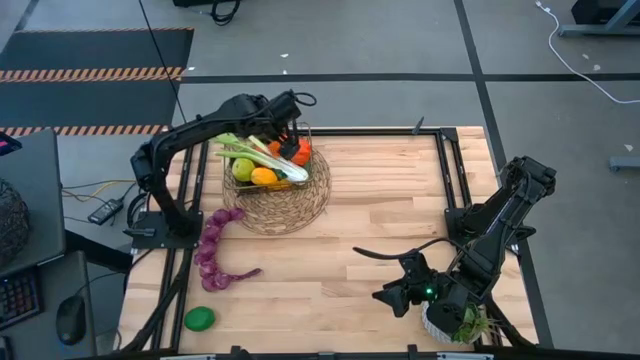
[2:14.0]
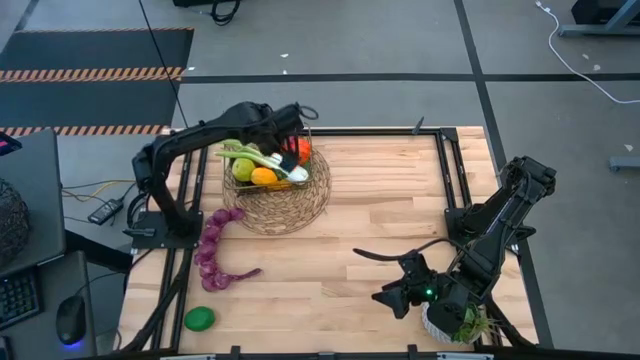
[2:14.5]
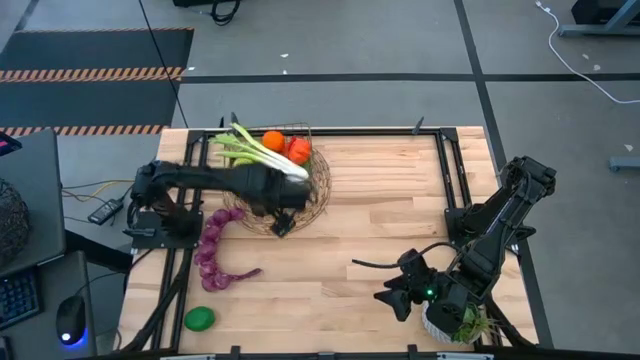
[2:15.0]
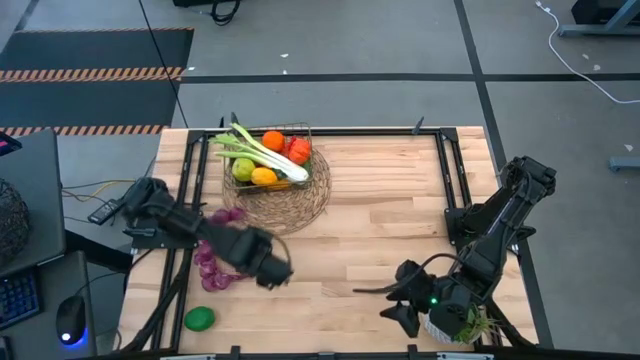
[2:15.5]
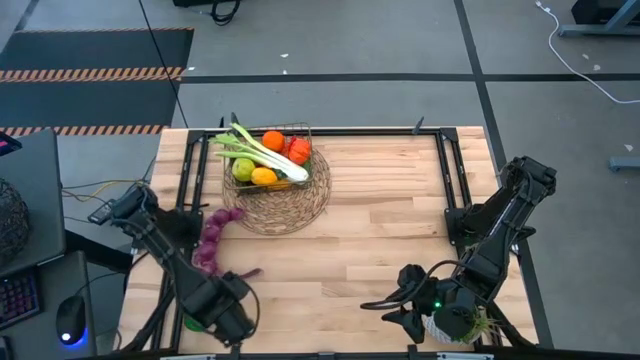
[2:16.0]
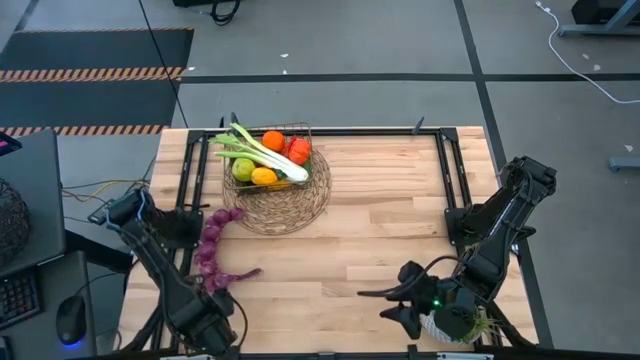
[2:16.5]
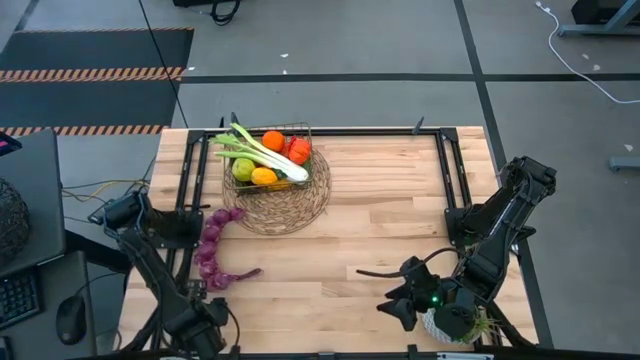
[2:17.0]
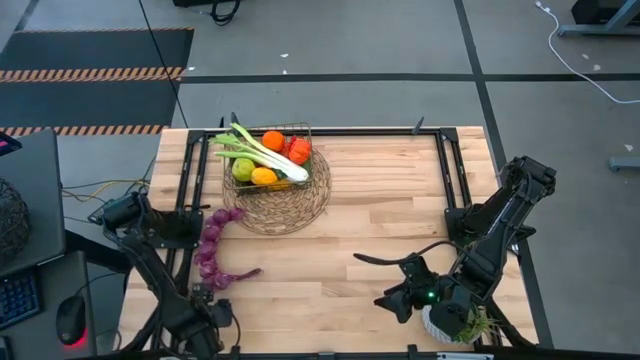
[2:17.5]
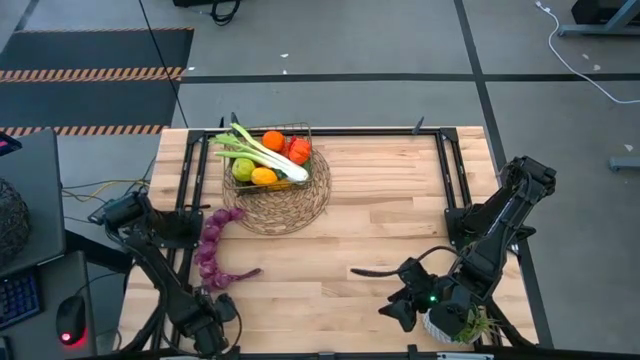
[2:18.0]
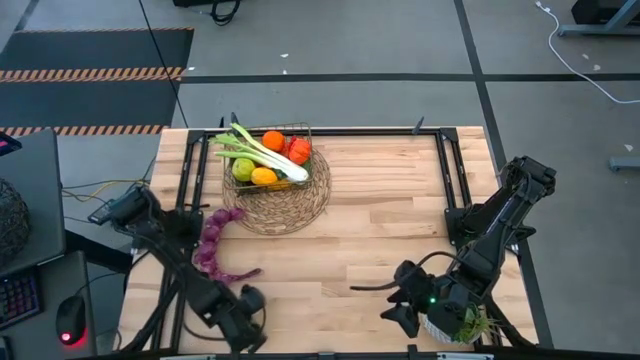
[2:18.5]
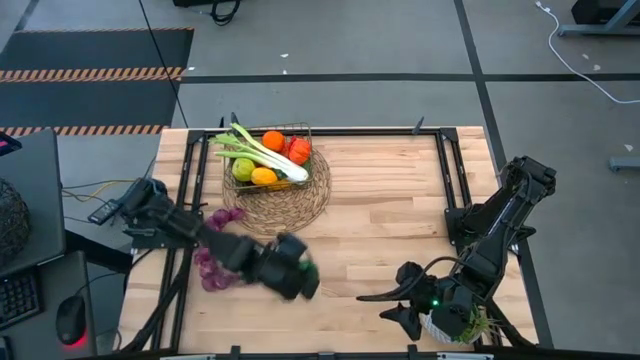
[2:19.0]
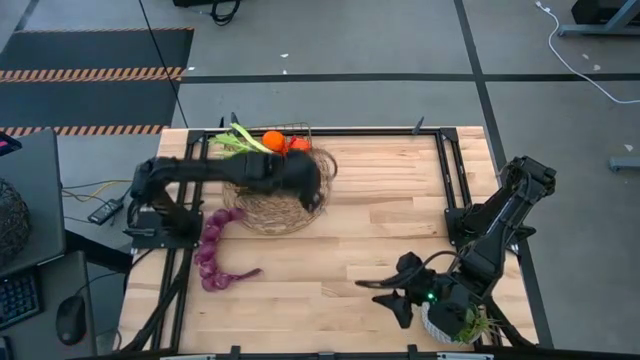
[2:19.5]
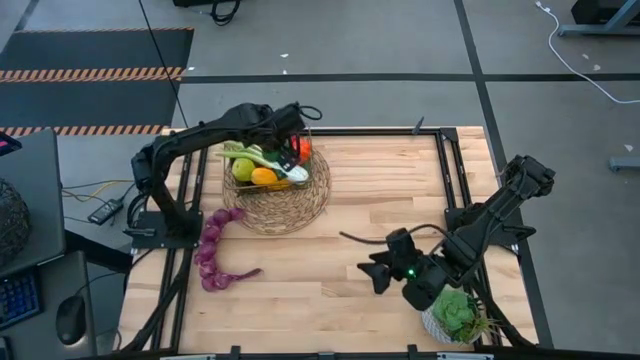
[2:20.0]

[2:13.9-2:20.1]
Task: Build produce basket
Put the green lime into the wire basket

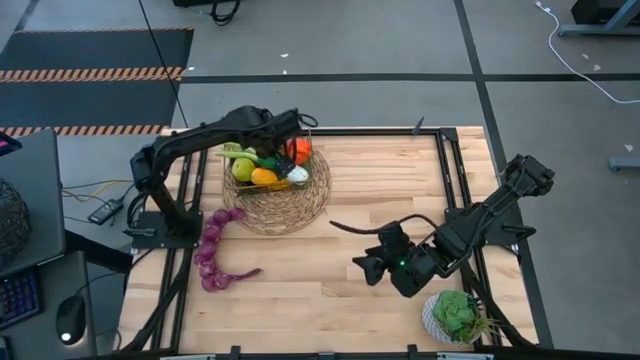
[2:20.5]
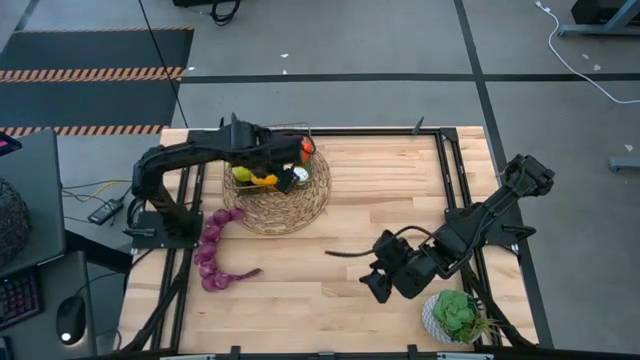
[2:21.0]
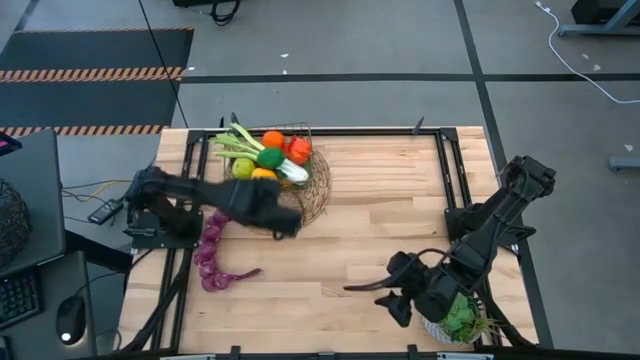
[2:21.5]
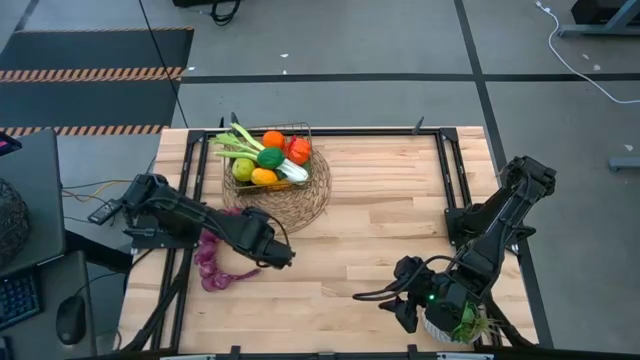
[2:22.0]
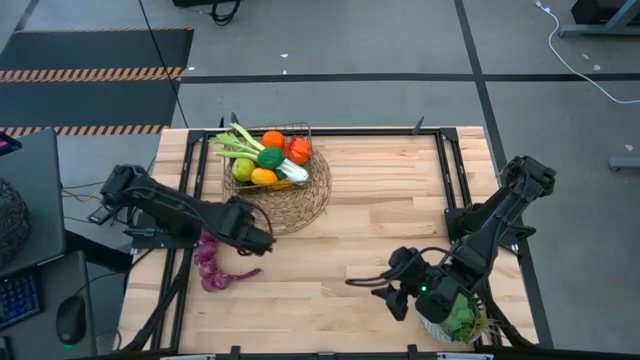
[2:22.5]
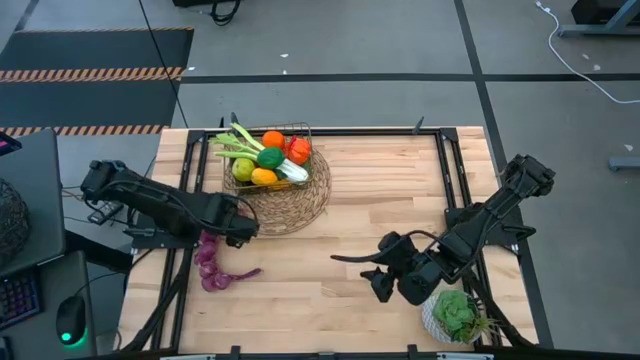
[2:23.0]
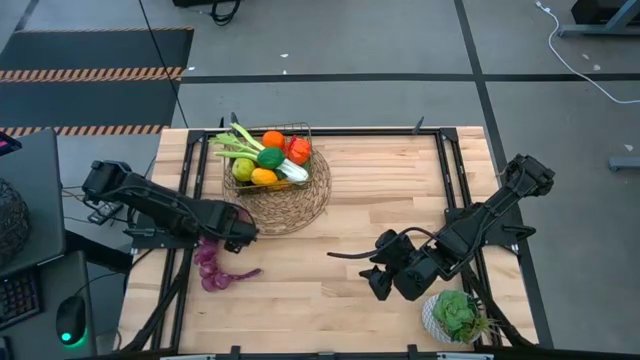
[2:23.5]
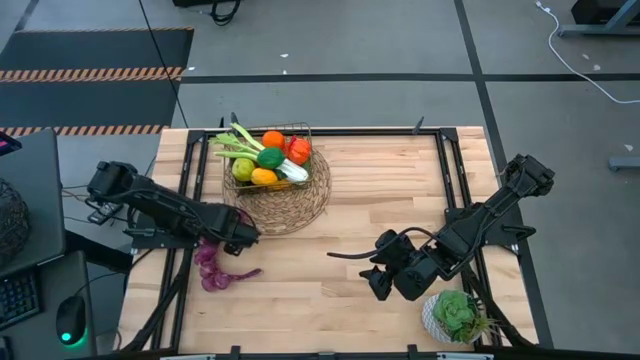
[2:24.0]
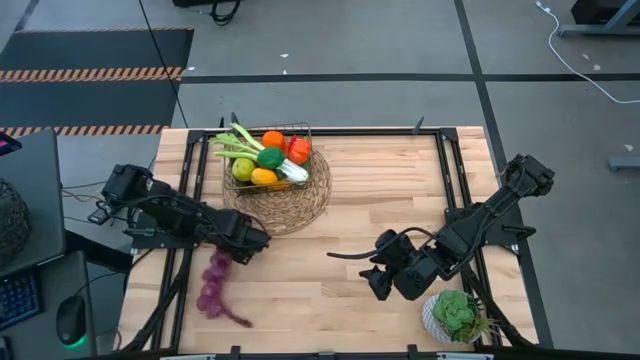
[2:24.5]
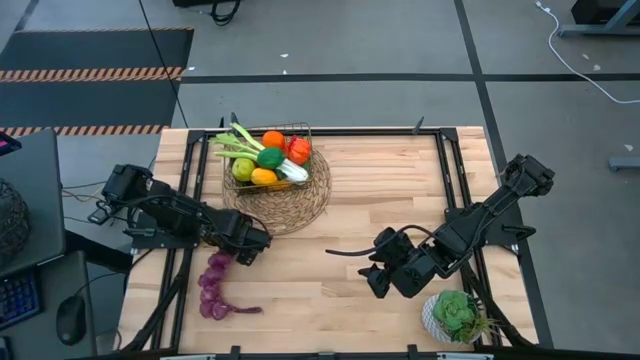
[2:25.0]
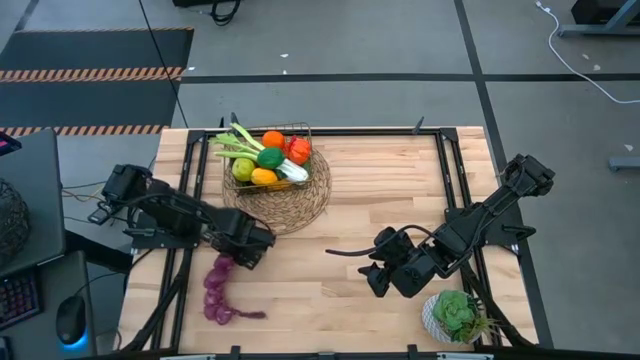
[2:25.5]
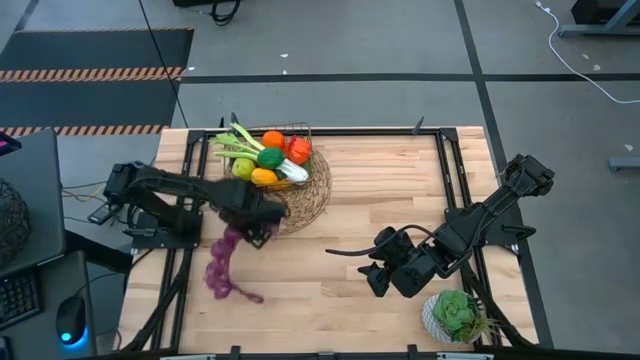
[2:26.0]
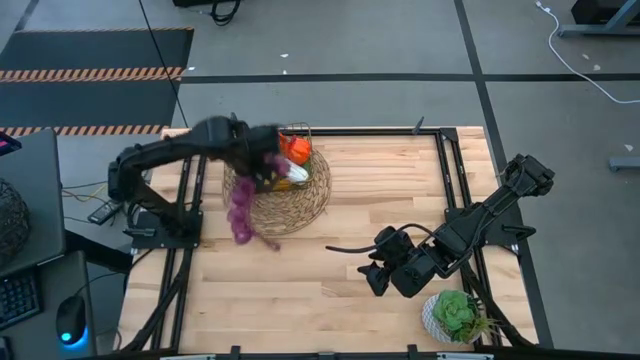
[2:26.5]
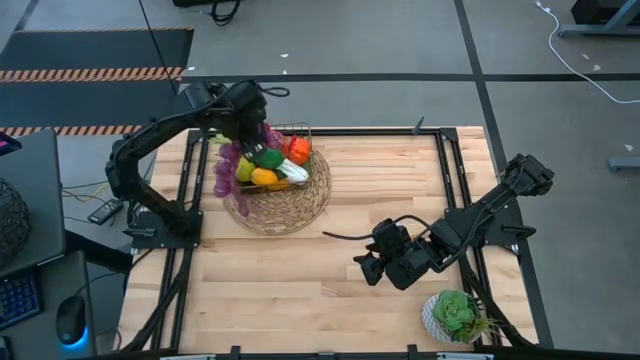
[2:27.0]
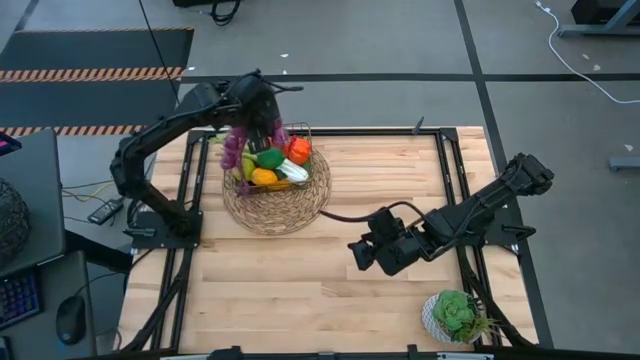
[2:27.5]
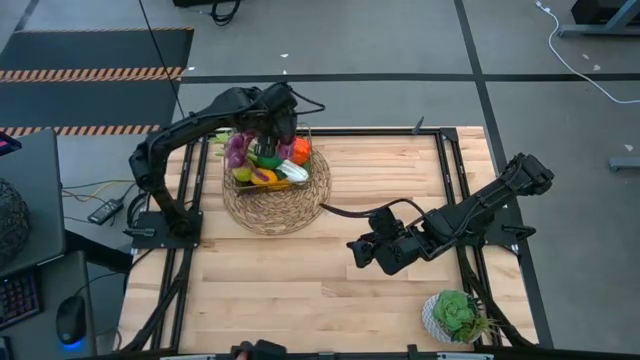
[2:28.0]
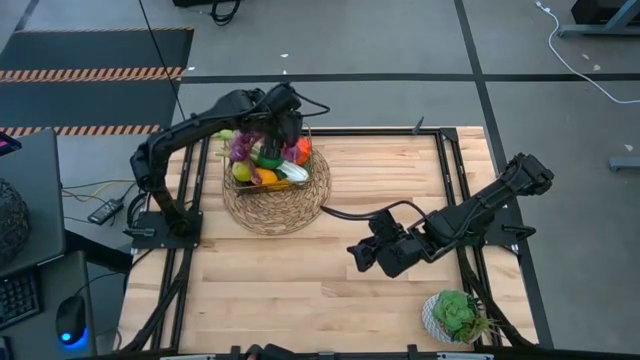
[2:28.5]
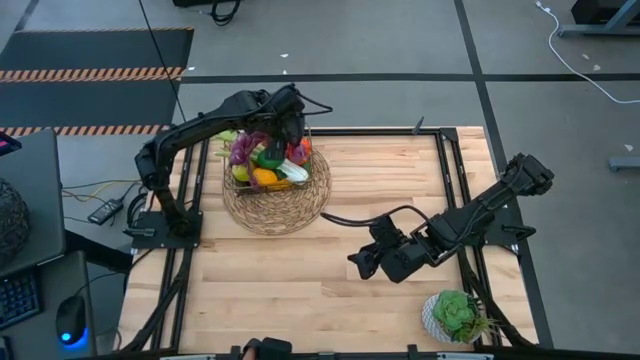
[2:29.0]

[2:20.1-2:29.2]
Put the purple garlic into the wire basket

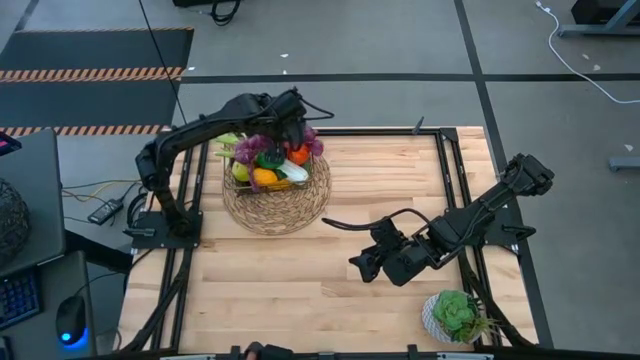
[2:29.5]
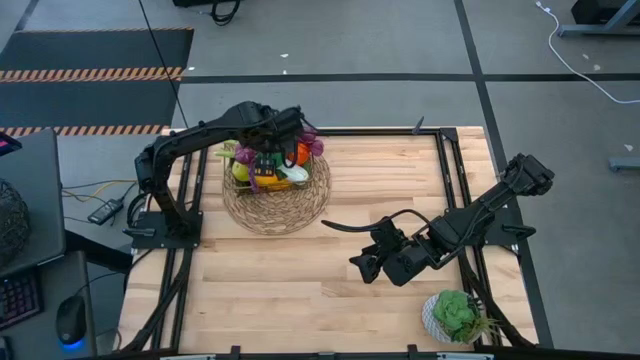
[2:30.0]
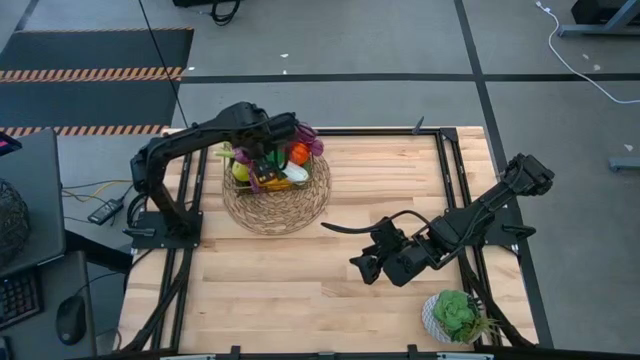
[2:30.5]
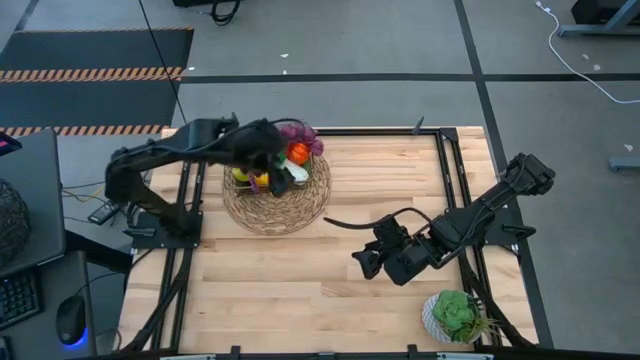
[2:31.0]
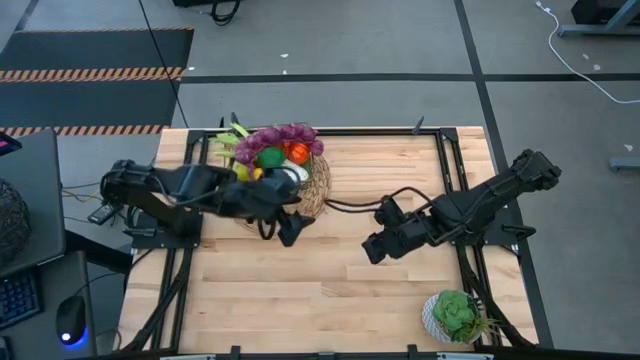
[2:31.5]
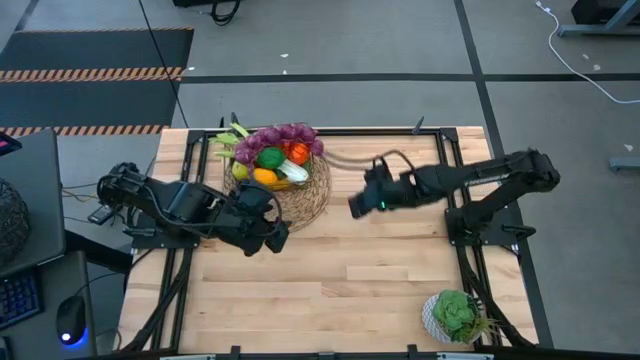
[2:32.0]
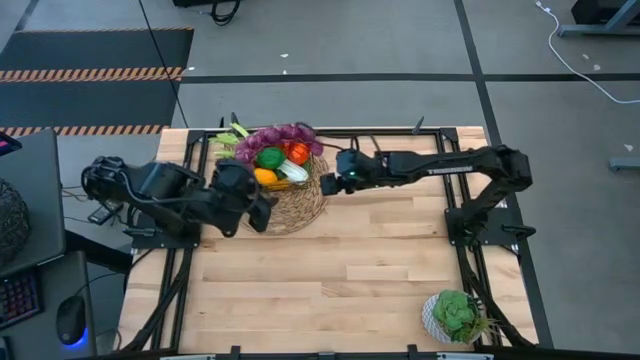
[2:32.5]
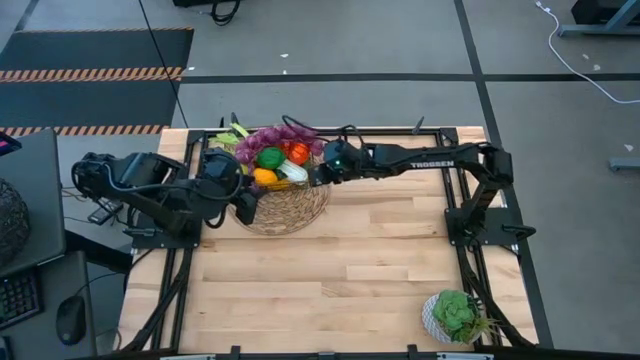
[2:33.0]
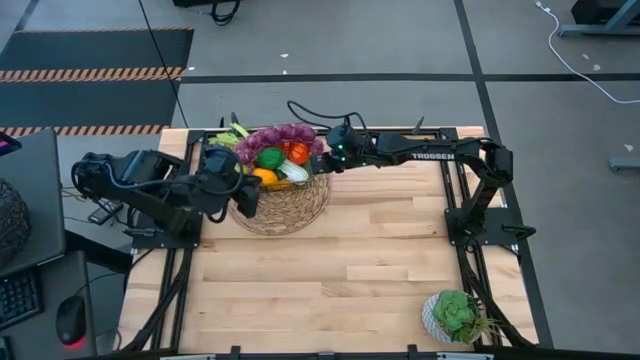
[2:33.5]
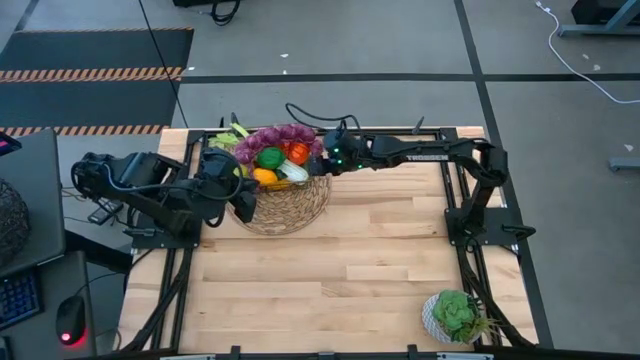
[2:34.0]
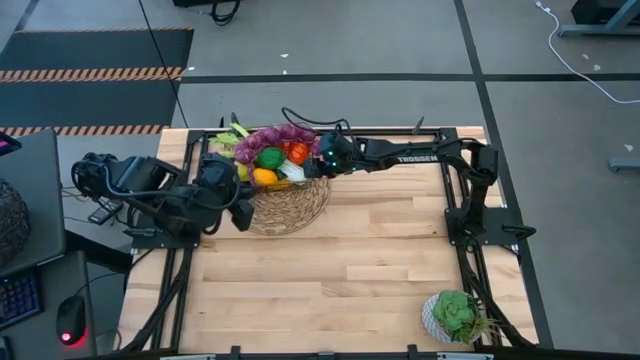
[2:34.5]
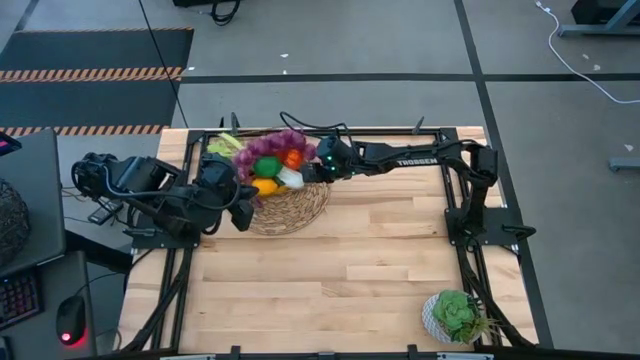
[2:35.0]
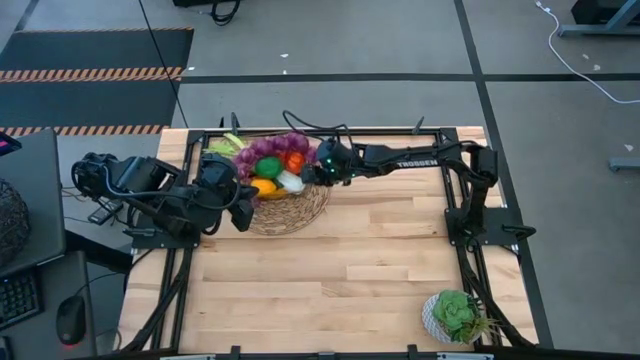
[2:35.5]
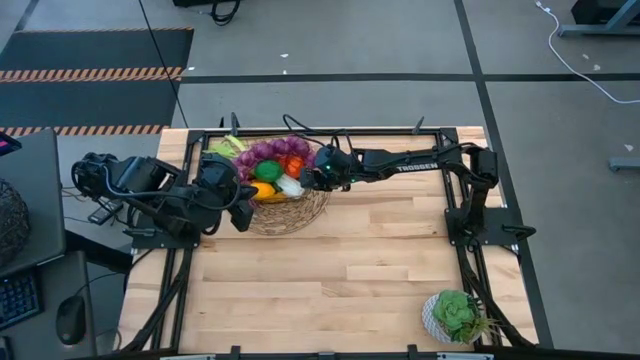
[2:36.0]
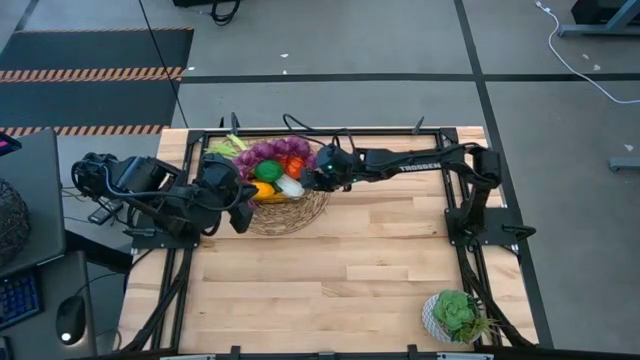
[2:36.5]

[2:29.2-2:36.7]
Adjust the wire basket
